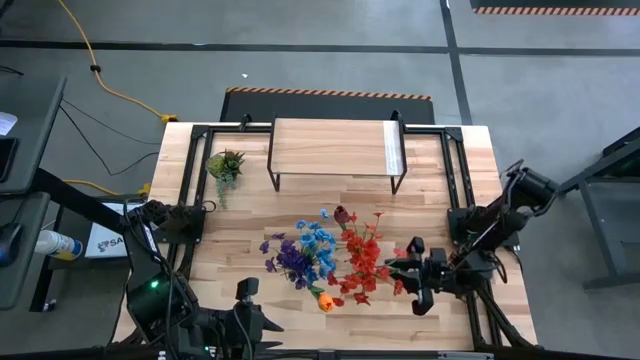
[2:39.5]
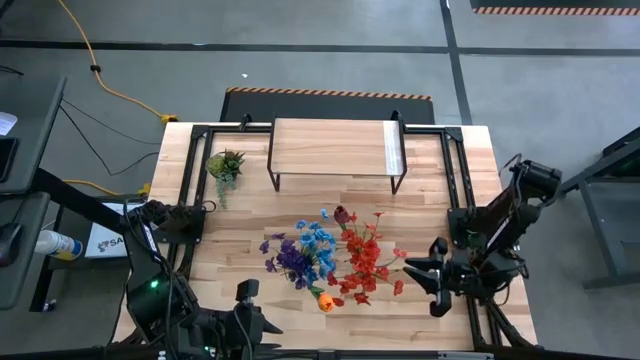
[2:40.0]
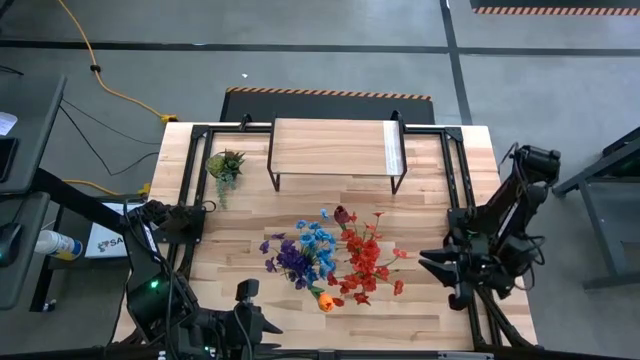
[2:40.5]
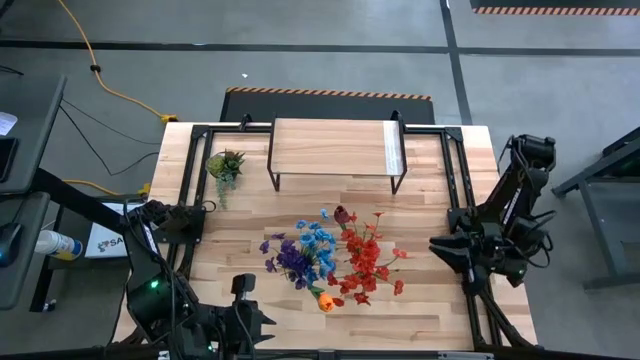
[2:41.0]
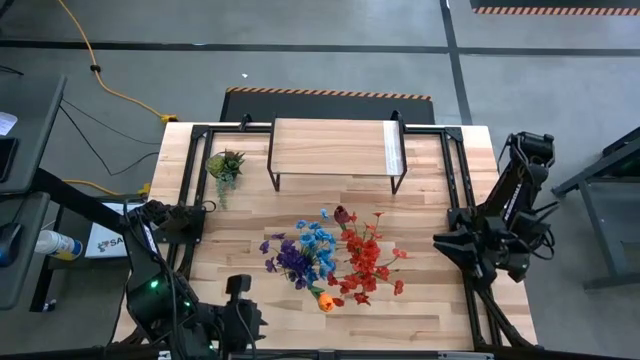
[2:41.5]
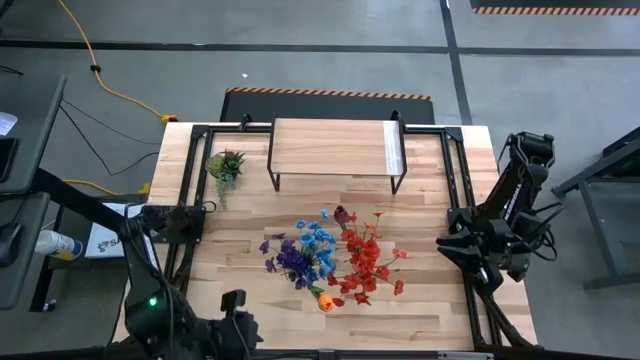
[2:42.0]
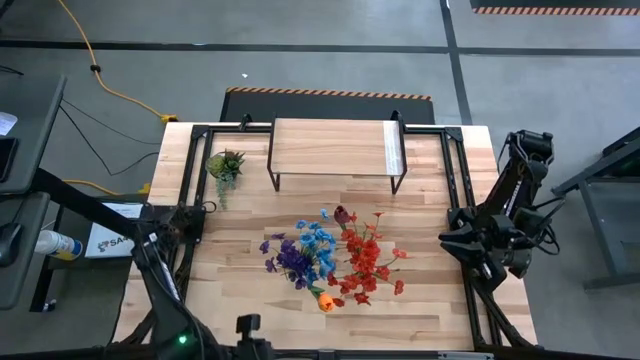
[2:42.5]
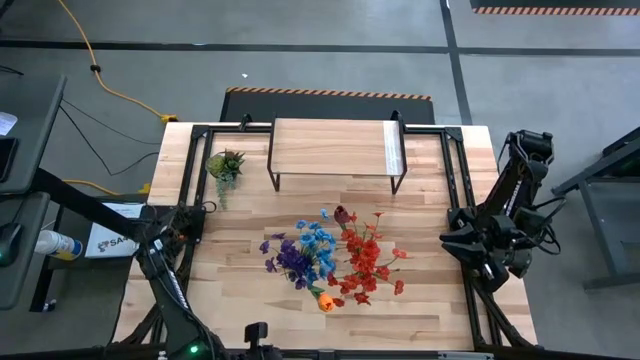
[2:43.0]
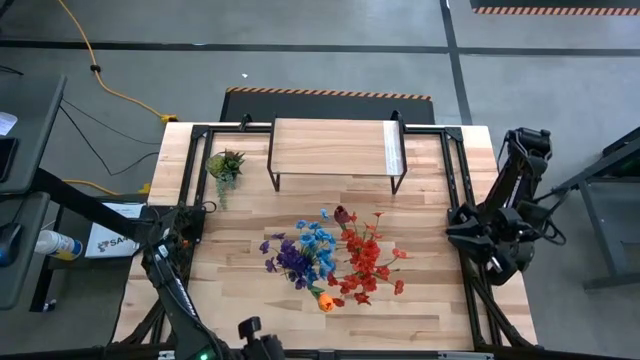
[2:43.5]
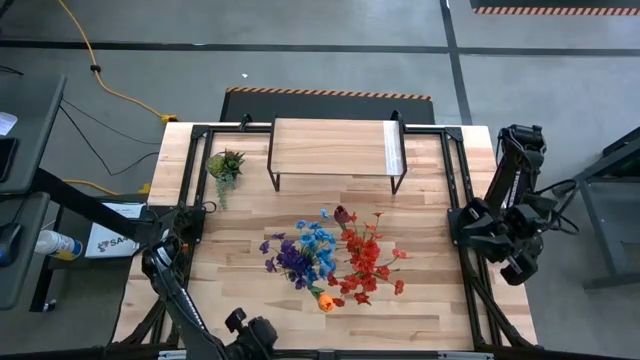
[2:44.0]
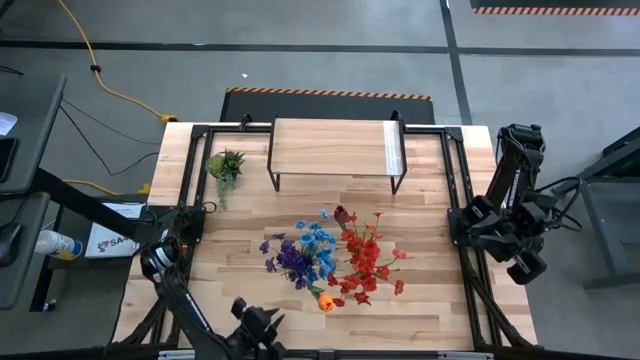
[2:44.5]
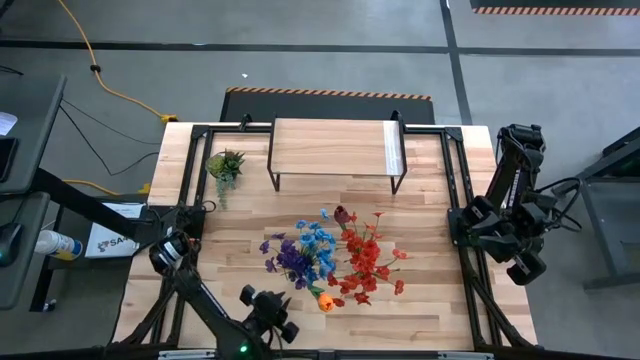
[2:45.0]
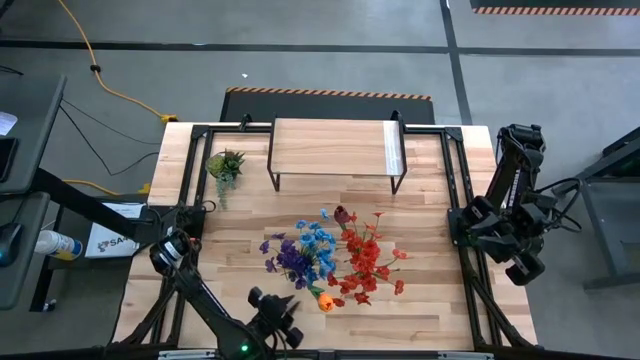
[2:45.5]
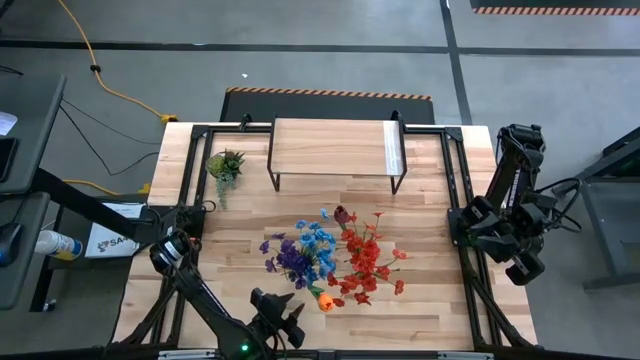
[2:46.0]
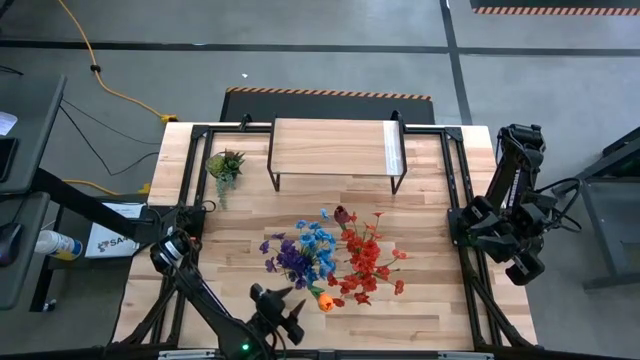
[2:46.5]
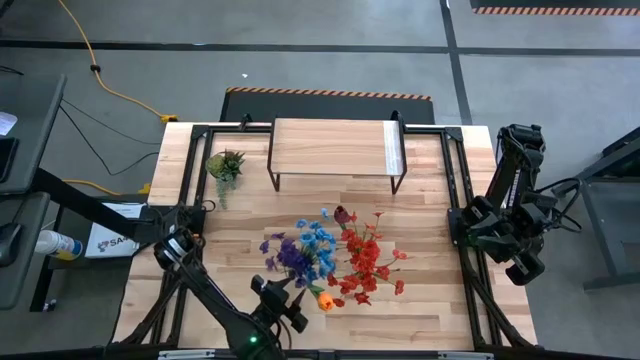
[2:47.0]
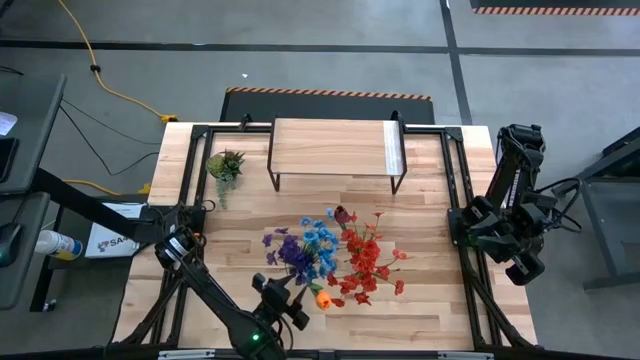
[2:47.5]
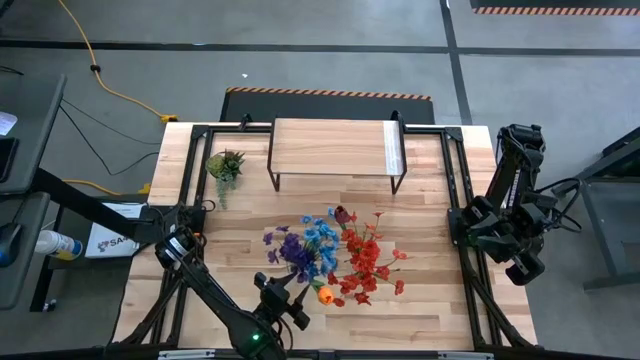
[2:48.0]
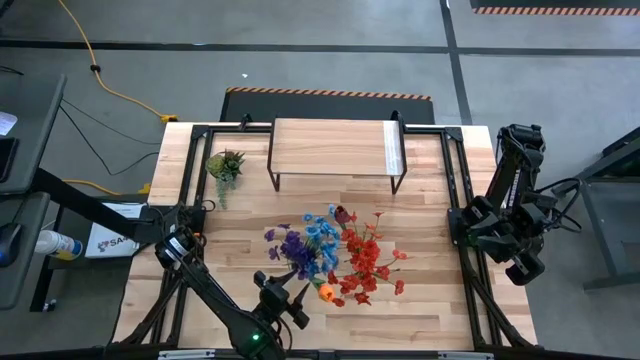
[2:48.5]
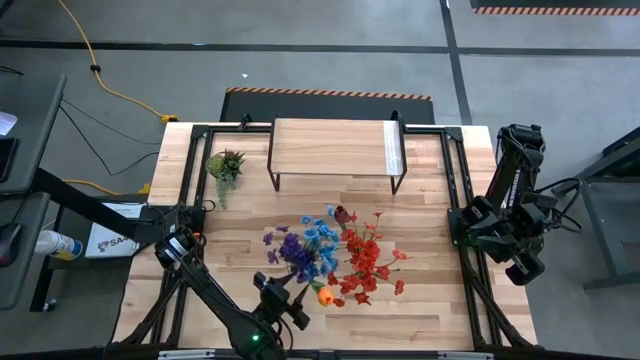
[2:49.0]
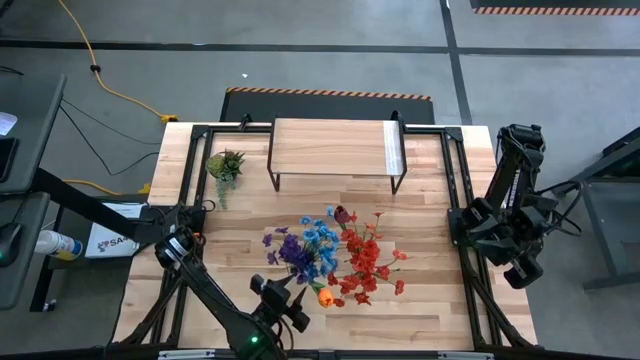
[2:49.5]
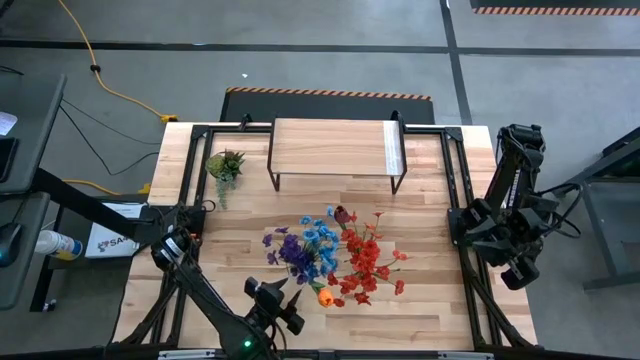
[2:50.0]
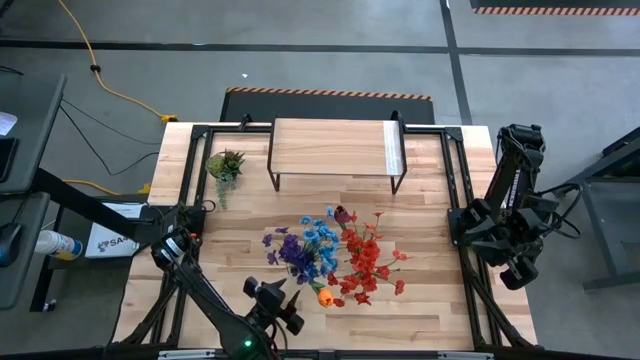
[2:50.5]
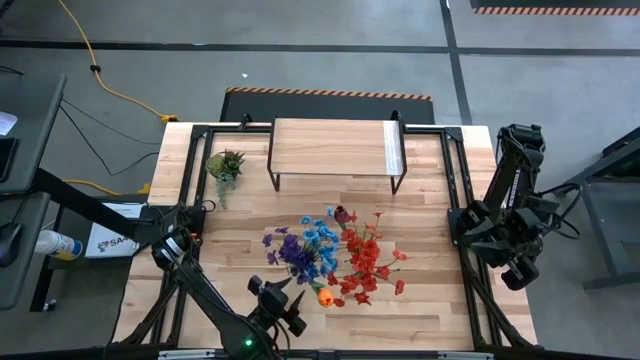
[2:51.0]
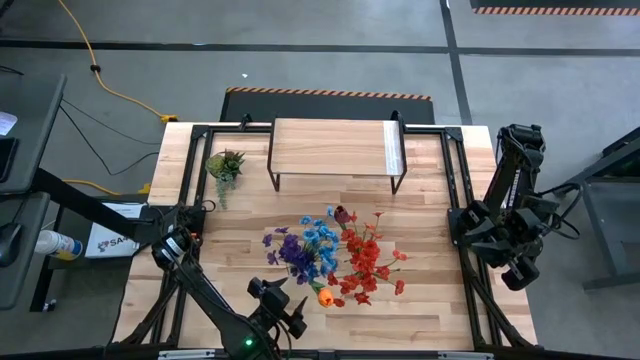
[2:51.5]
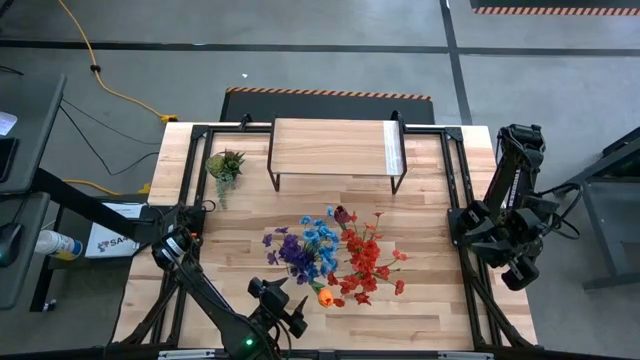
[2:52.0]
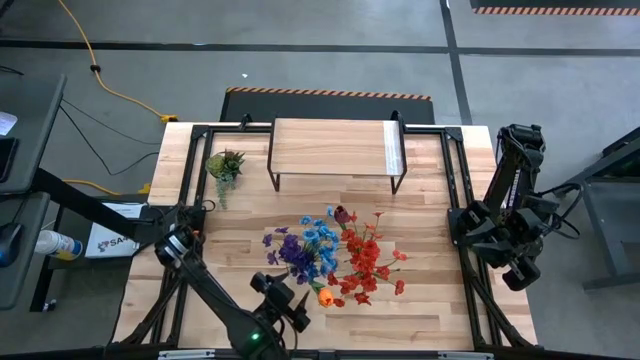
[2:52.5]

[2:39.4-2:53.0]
Task: Pick and place flowers into a vace then onto a shelf
Put the left transparent flower vase with the flowers on the shelf

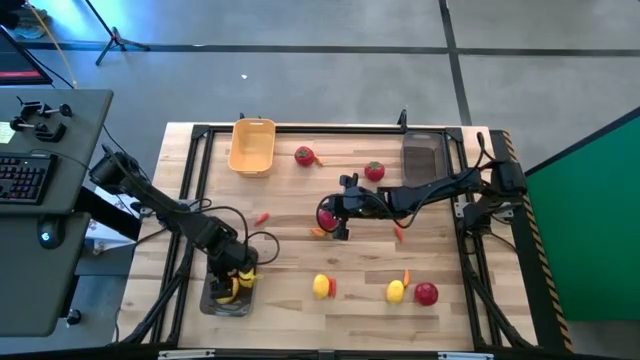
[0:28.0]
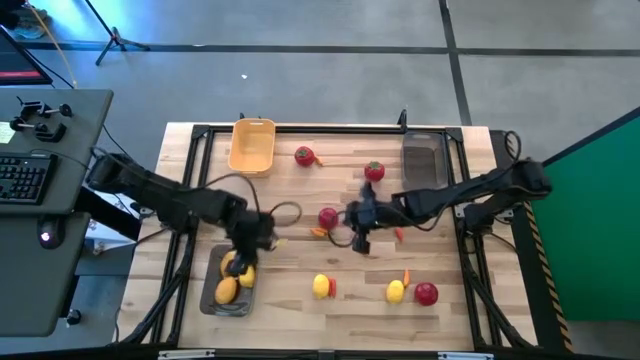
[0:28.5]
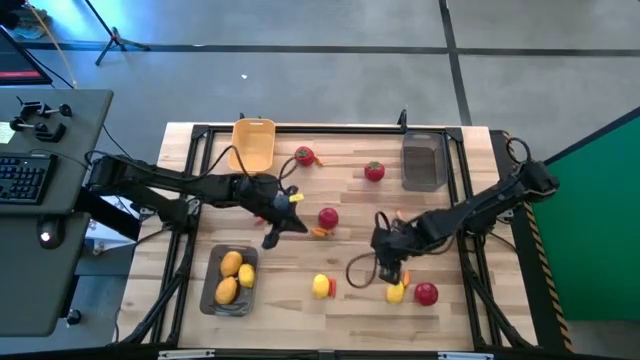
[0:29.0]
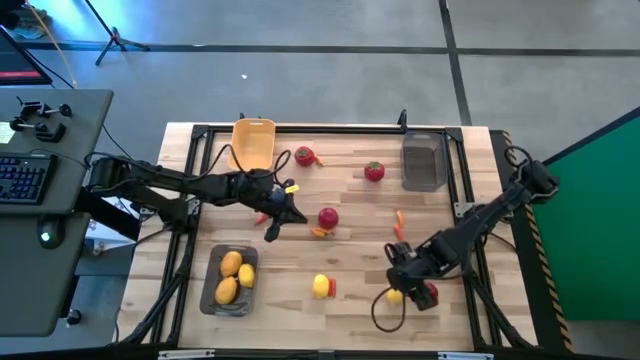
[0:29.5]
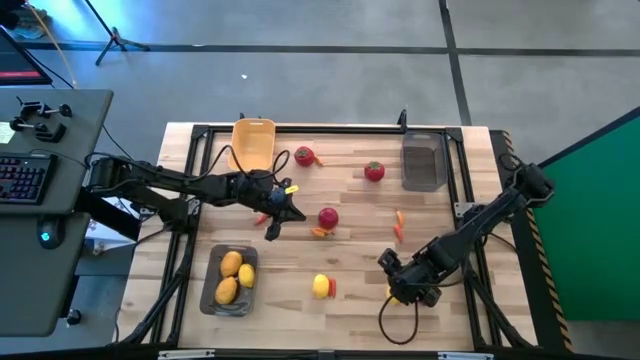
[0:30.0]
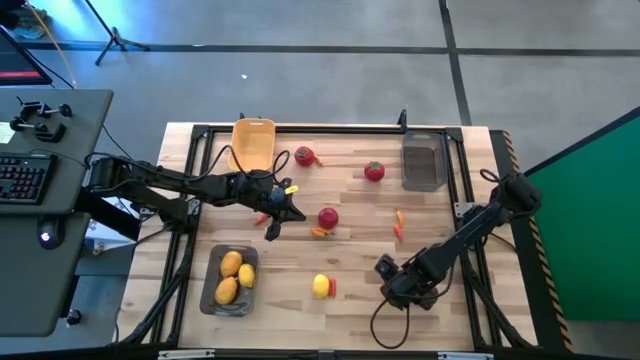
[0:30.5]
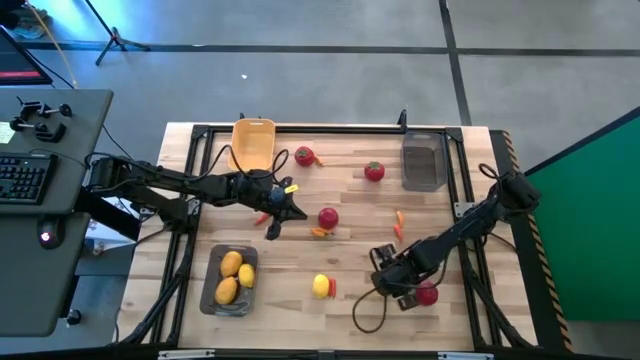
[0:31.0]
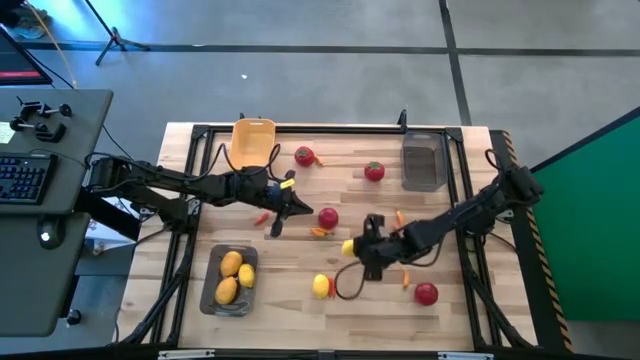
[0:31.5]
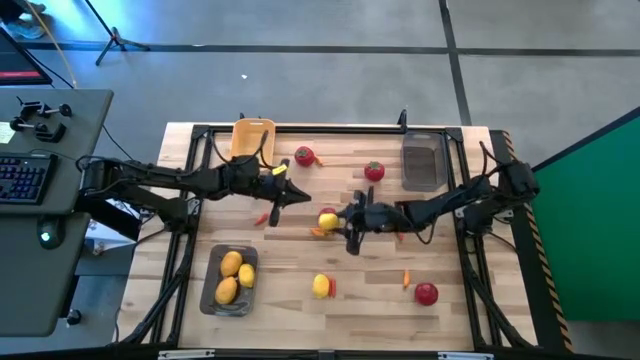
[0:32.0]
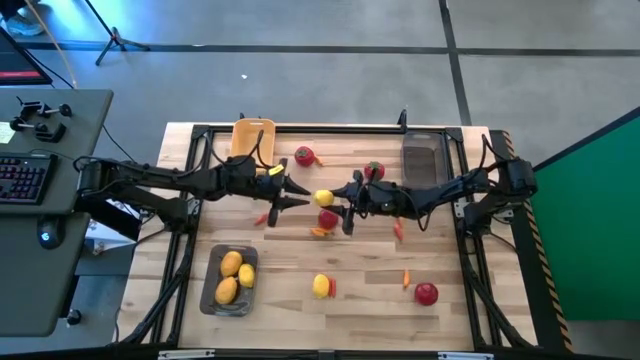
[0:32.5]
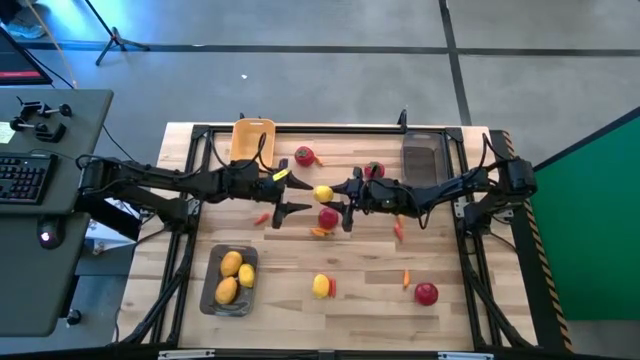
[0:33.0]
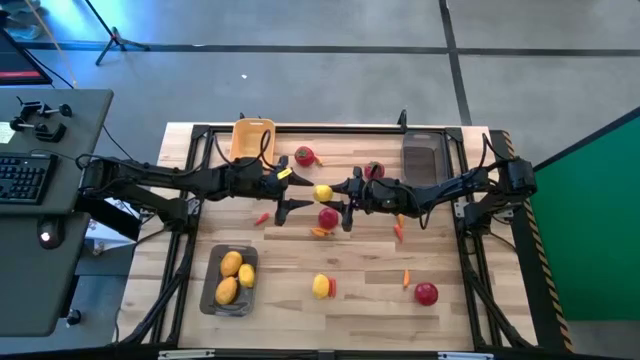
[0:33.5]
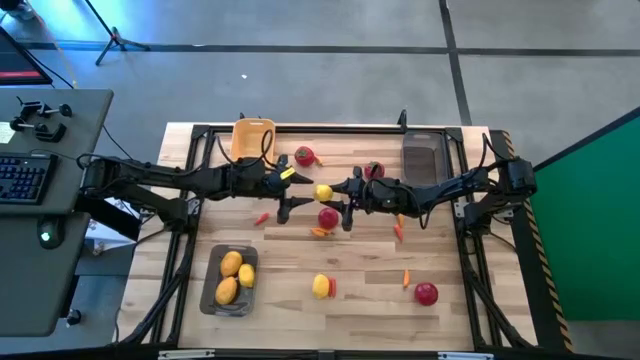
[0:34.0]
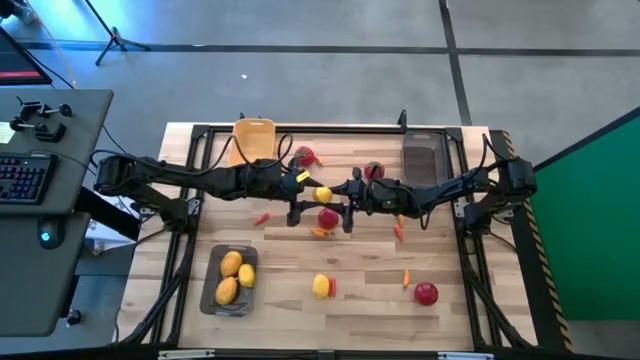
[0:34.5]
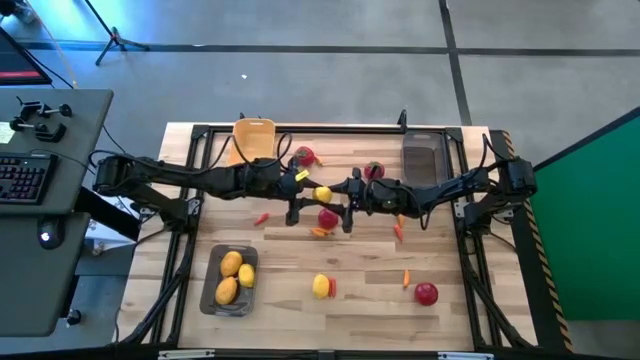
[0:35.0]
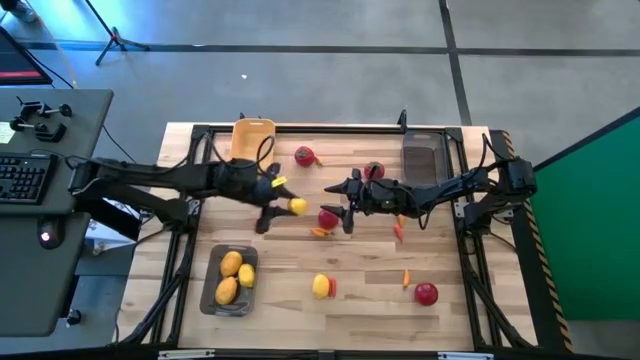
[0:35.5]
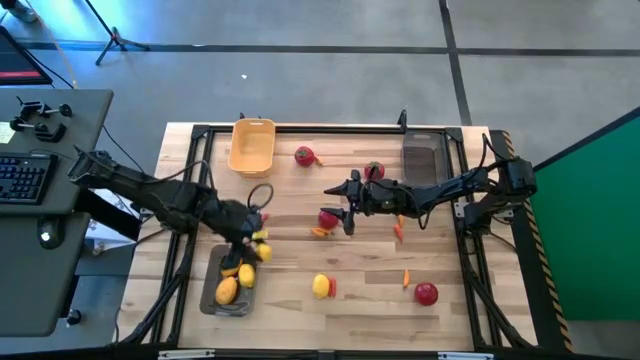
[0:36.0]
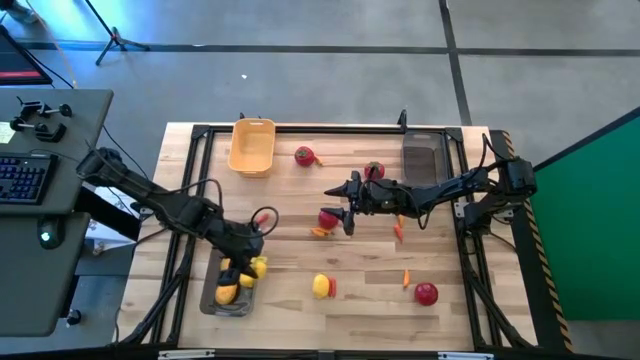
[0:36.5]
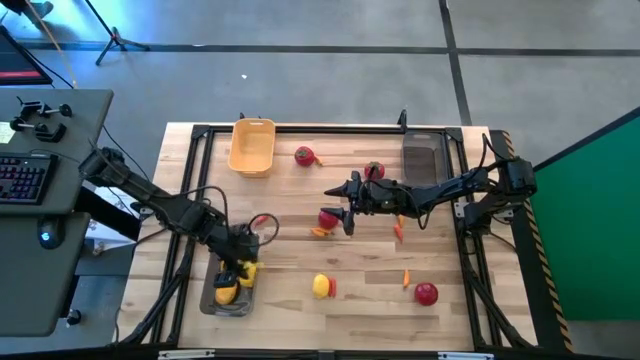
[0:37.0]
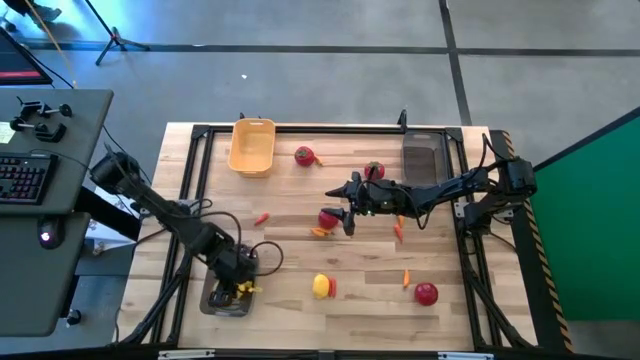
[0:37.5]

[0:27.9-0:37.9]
Task: Sort produce into baskets
Put the lemon into the bottom gray bin
